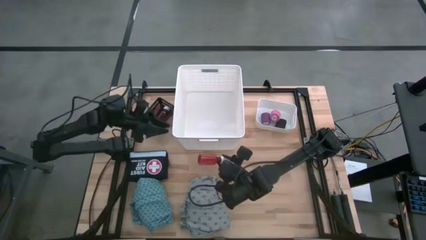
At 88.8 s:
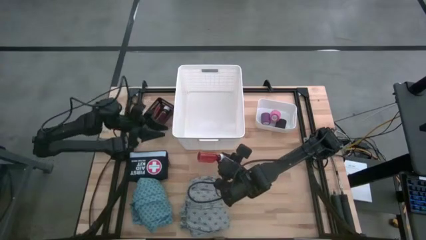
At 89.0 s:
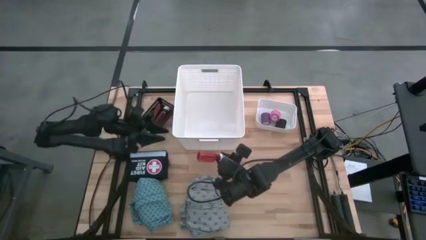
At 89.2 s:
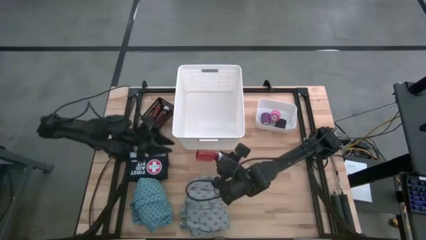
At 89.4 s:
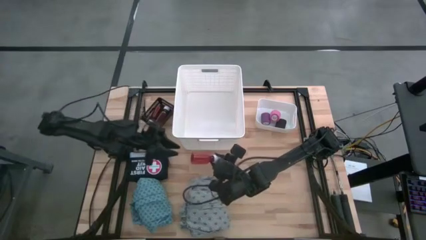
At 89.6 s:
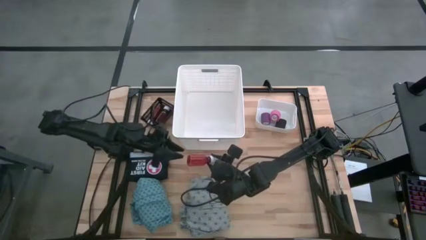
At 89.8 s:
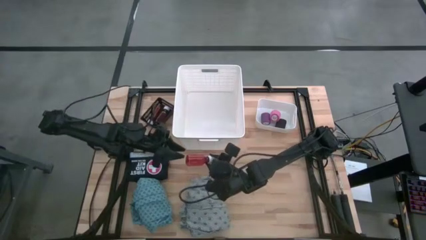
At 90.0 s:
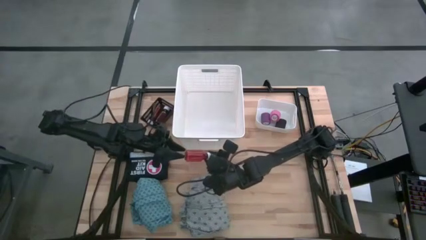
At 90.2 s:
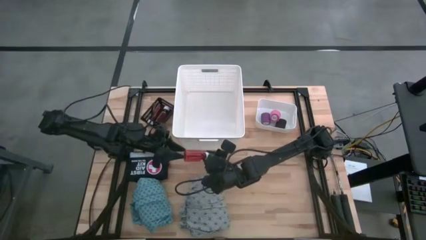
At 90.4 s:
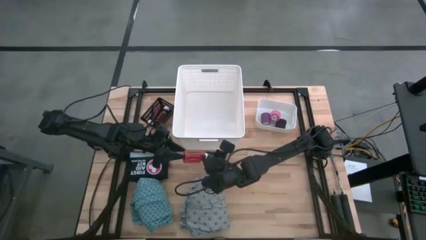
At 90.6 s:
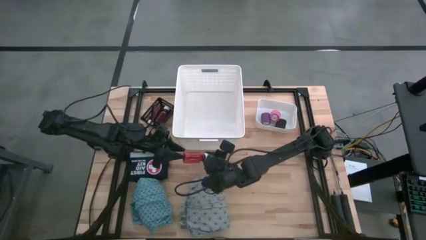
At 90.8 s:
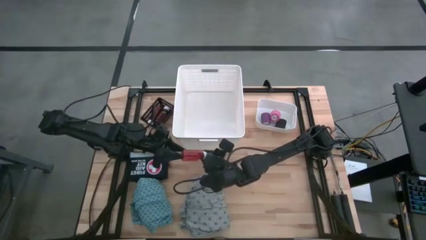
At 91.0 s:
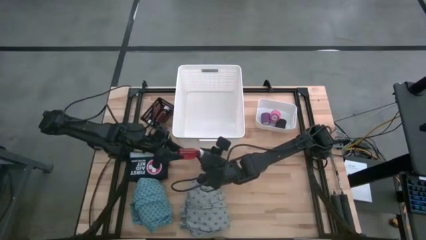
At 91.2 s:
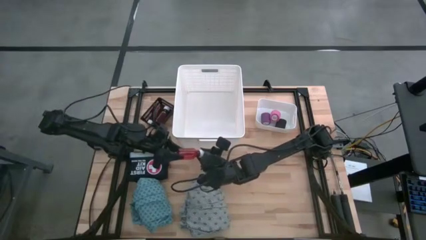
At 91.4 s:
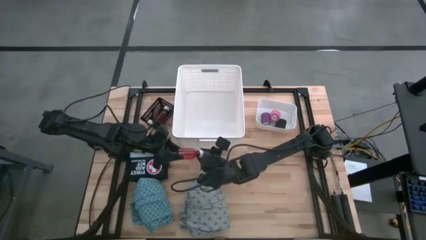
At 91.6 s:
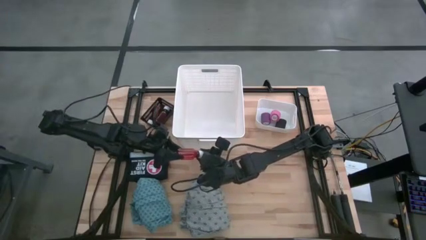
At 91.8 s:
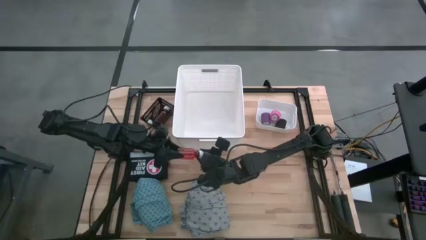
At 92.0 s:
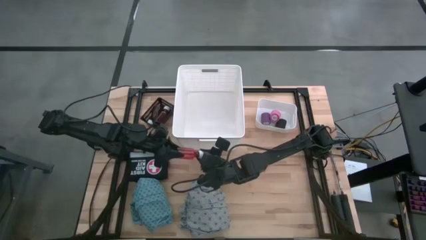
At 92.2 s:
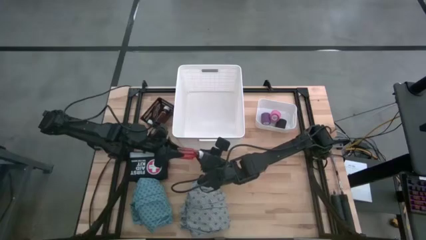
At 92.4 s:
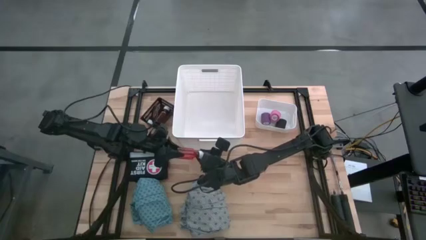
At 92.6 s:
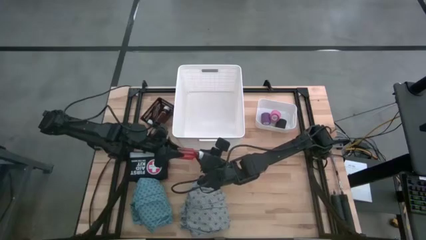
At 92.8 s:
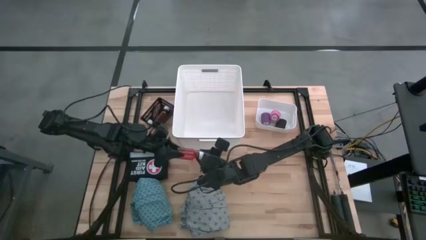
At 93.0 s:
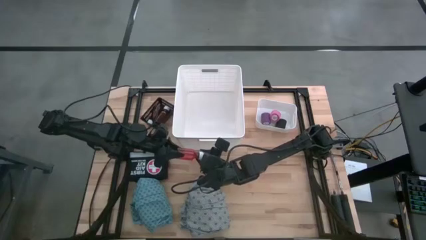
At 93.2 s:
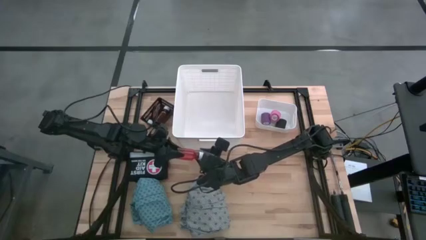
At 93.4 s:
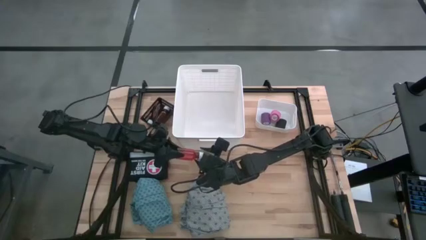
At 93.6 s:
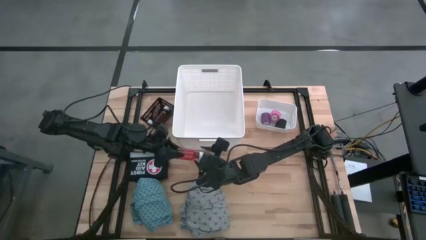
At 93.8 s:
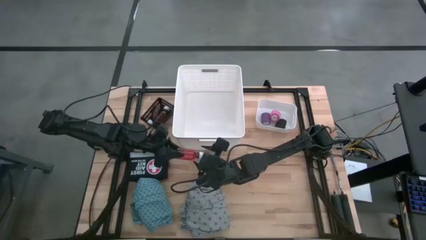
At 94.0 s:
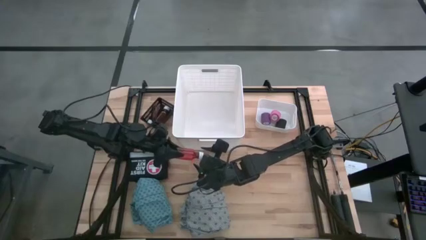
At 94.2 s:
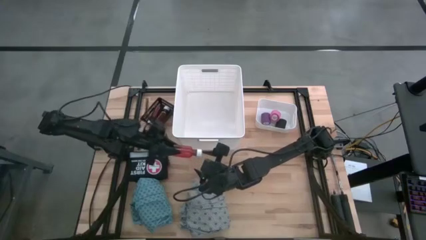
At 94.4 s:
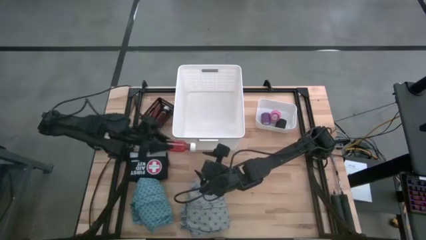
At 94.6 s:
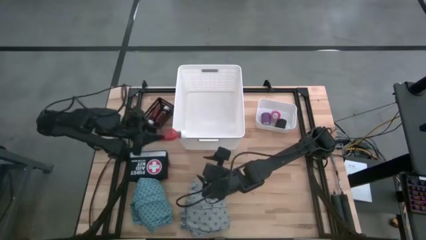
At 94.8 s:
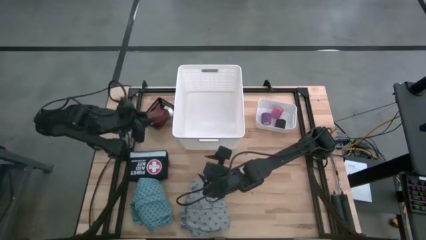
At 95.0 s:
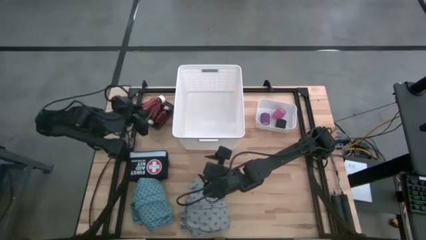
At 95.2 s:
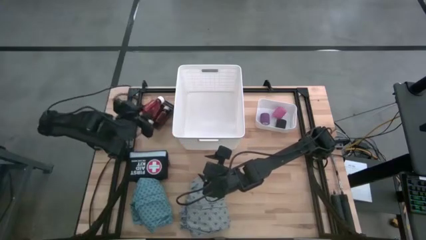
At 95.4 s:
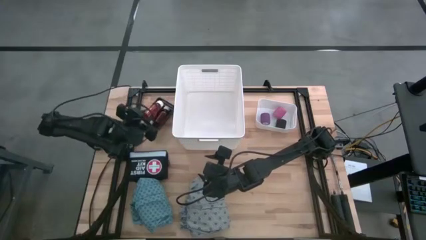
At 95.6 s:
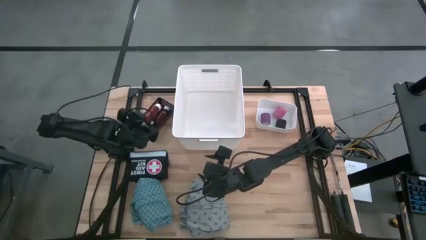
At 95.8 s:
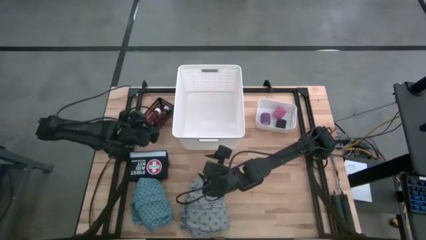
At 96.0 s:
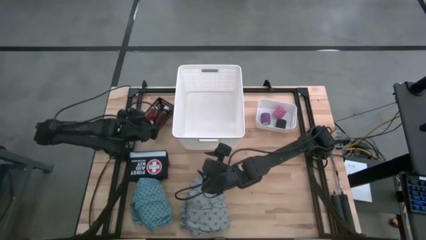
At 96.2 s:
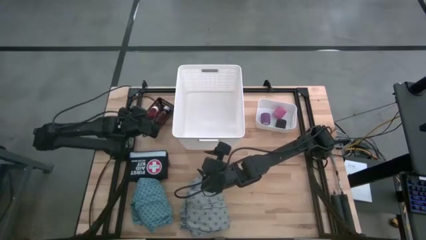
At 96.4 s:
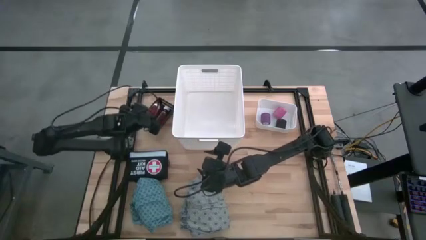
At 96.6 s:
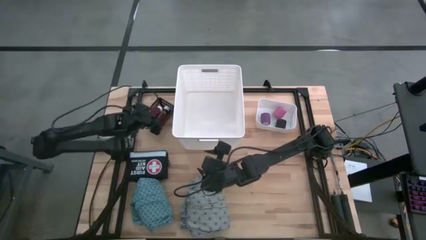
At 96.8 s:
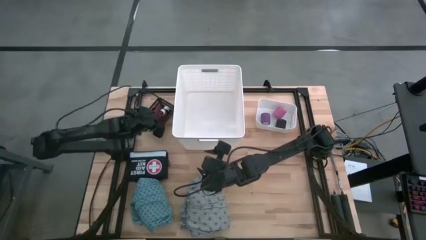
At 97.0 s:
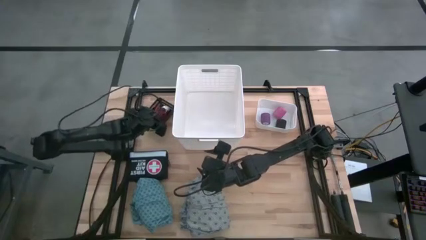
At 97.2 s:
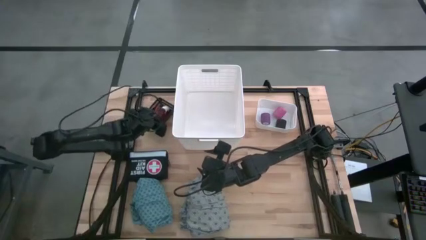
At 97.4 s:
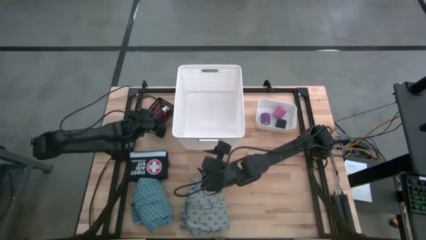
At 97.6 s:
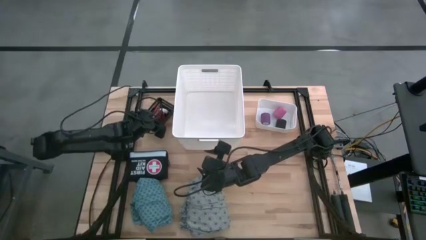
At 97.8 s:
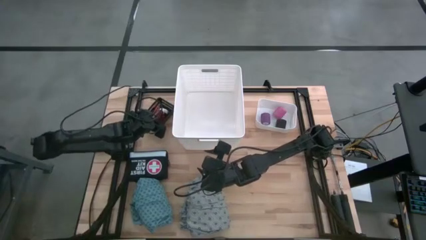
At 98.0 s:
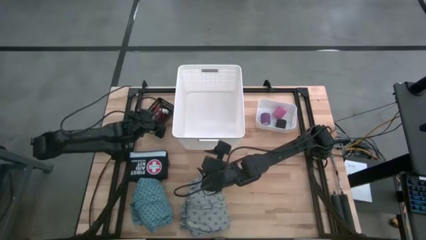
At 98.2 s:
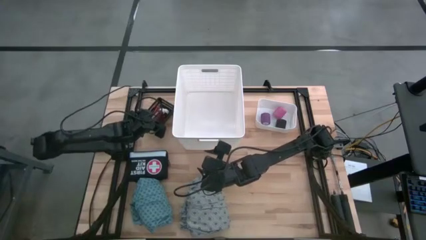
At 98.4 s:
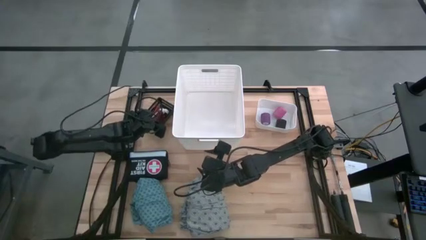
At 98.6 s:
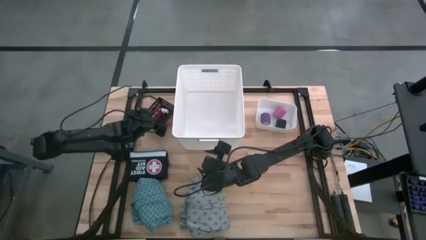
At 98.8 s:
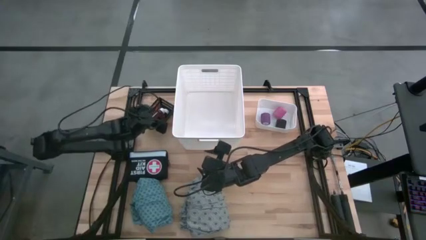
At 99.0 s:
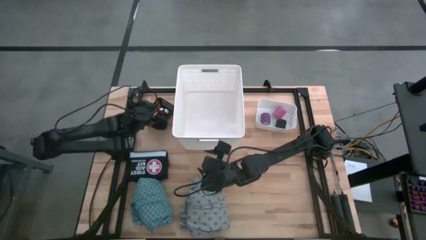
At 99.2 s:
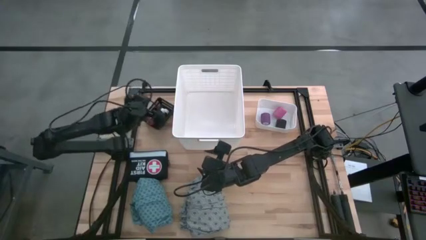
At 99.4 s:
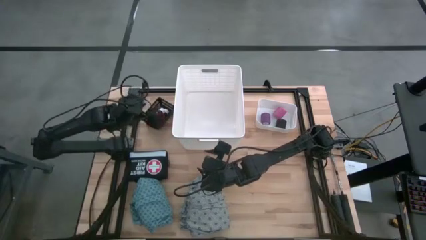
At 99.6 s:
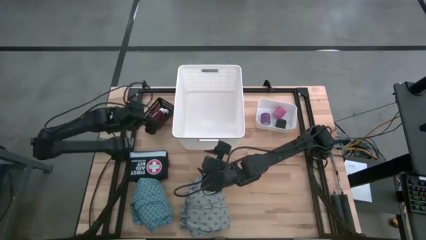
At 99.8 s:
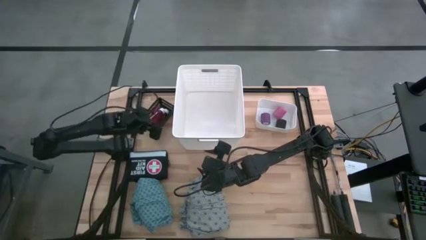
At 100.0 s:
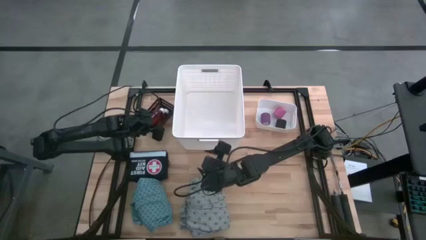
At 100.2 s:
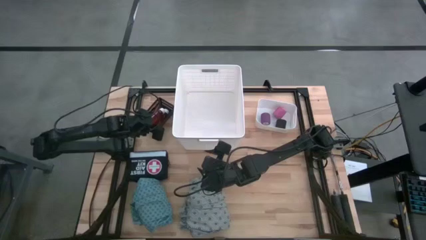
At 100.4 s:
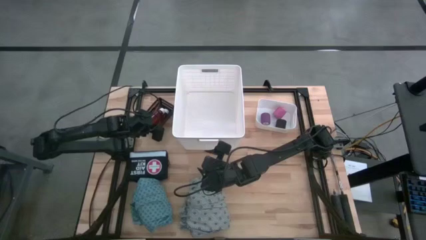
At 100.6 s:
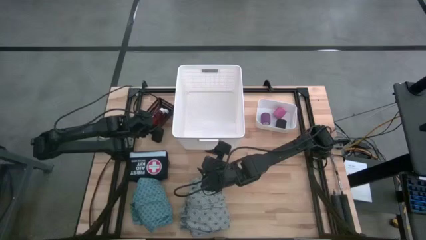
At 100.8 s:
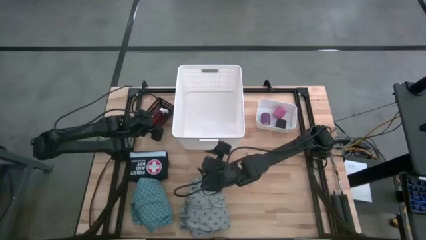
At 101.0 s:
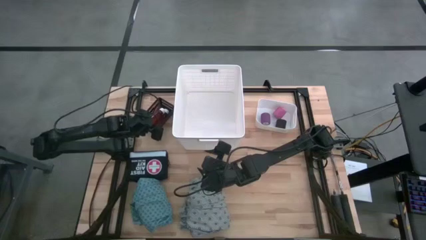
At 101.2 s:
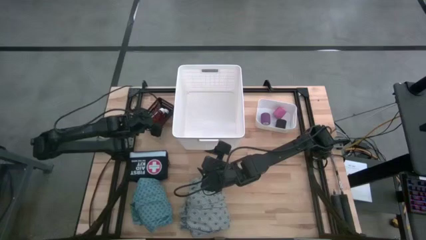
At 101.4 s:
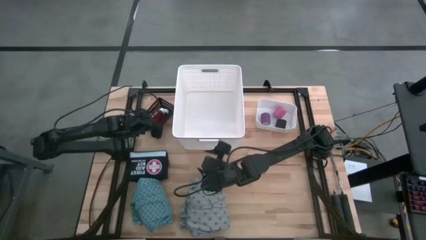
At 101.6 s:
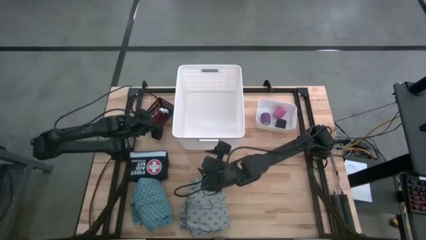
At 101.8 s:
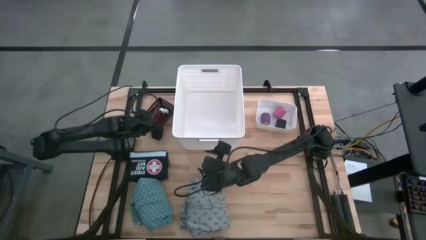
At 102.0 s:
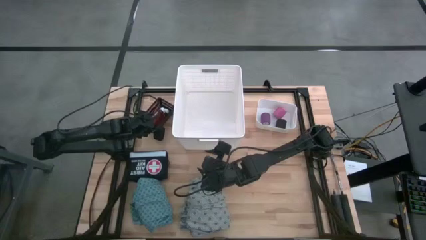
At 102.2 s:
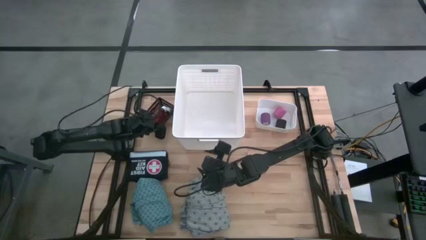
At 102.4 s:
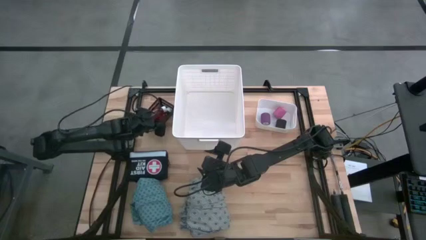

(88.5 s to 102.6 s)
Task: Pick & Place Medicine items
Put the red medicine bottle into the black bin
